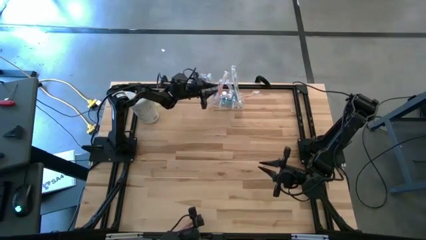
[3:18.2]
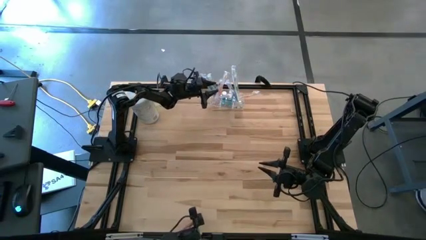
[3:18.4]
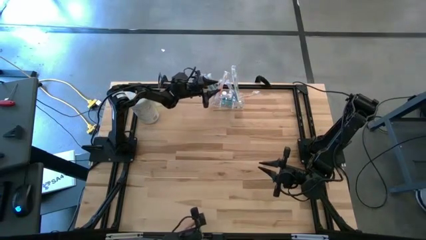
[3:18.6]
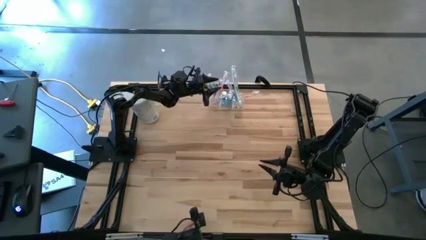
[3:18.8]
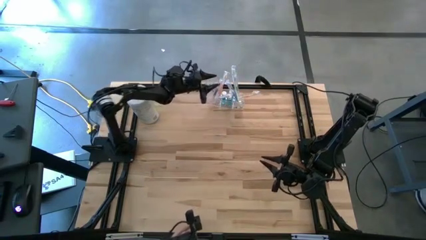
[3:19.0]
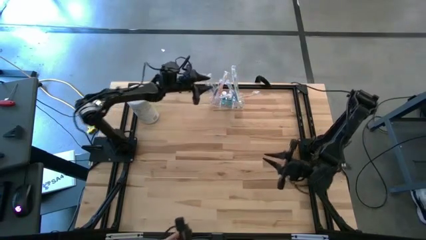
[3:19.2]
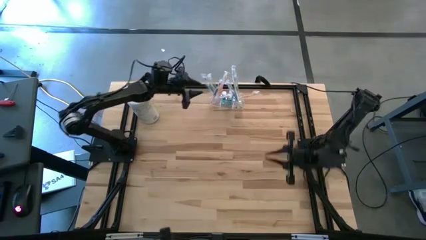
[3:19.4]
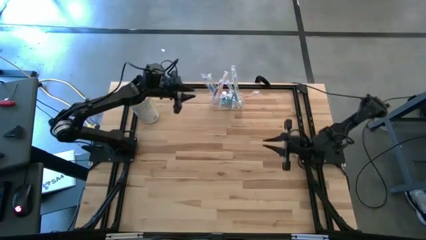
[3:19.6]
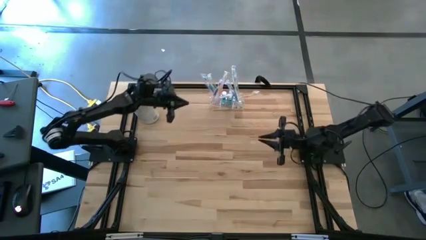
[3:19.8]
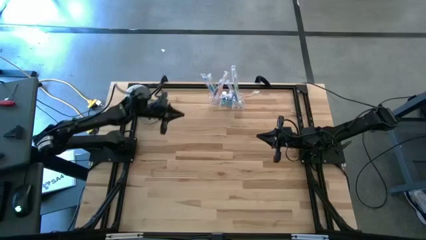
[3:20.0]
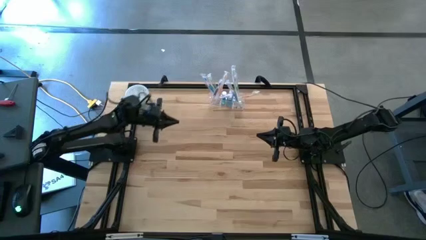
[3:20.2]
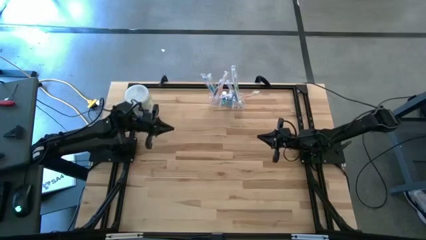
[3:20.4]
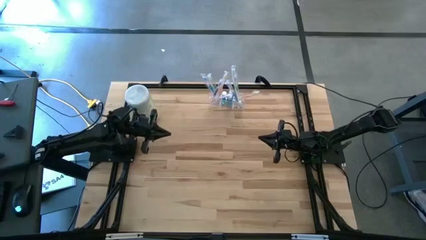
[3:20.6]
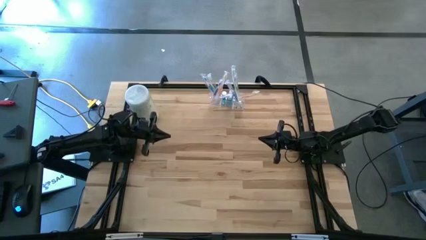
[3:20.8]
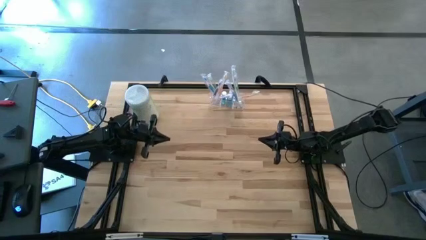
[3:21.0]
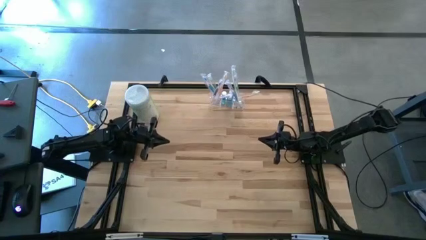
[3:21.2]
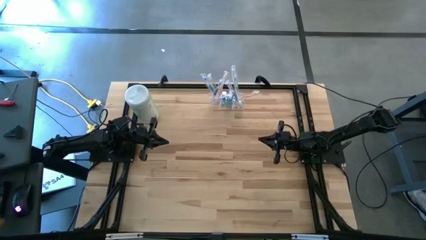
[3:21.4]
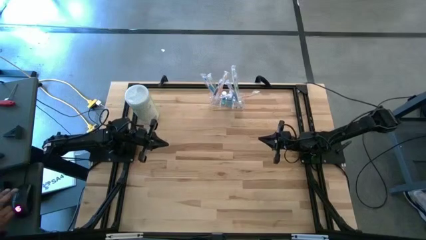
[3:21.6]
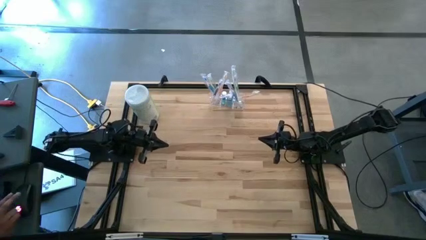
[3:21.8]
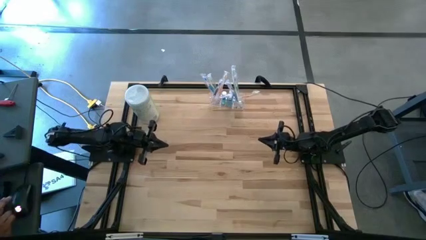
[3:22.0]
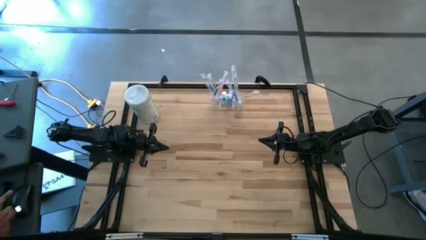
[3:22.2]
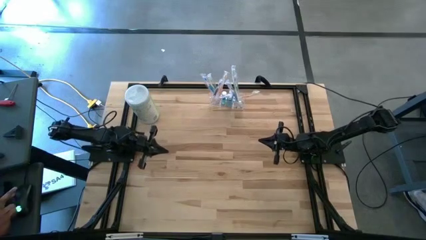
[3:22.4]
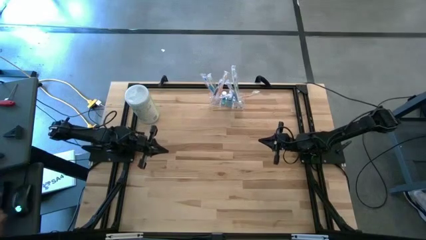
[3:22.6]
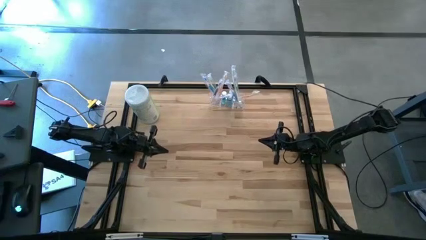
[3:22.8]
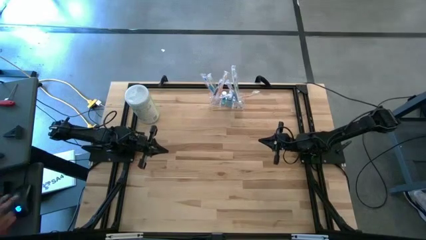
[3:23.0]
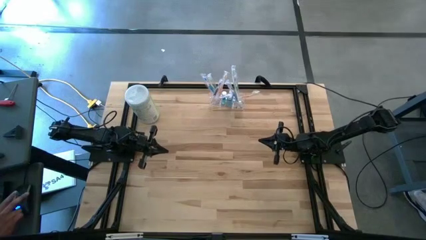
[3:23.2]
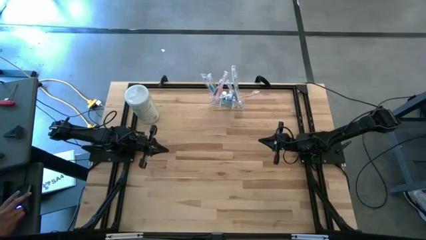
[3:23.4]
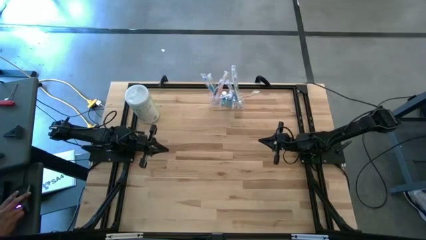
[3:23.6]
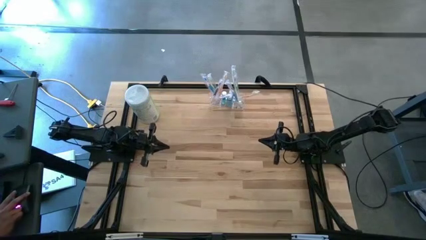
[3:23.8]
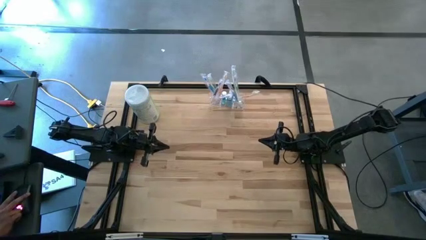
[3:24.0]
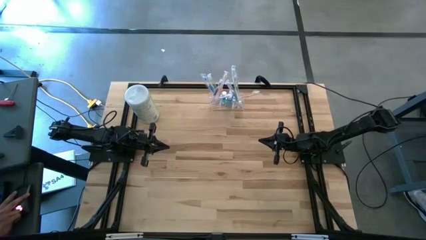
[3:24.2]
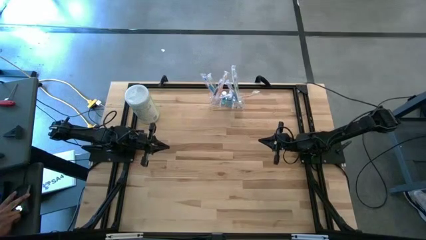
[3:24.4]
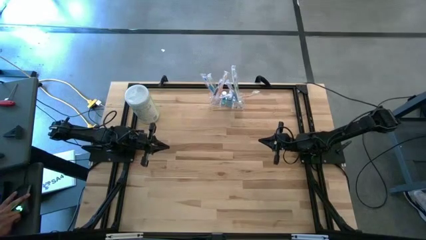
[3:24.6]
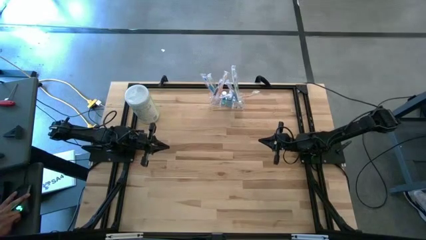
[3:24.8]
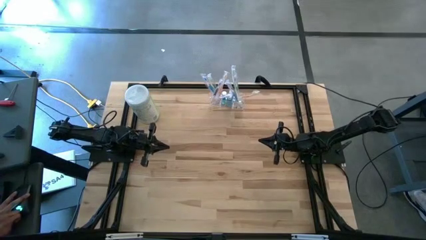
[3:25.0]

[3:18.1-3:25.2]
Task: Pick & Place toothbrushing station
Return to Home Position

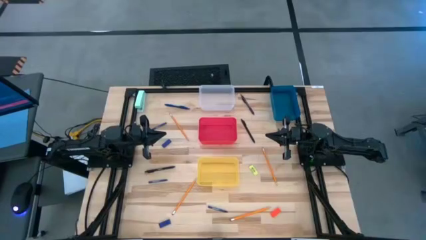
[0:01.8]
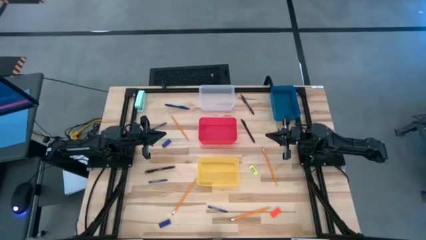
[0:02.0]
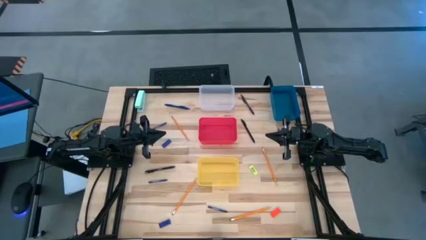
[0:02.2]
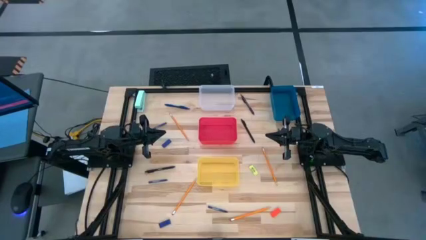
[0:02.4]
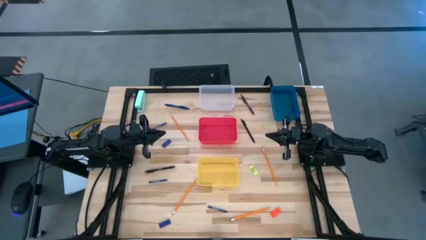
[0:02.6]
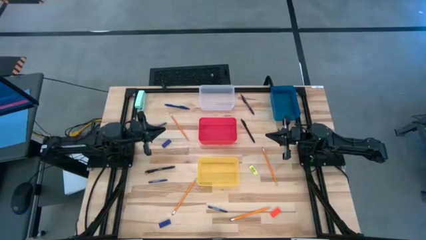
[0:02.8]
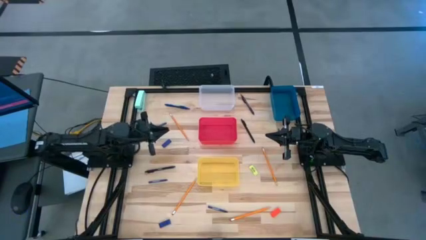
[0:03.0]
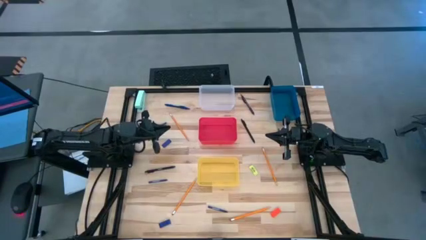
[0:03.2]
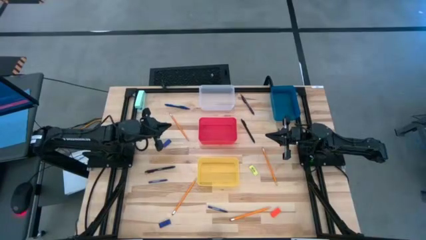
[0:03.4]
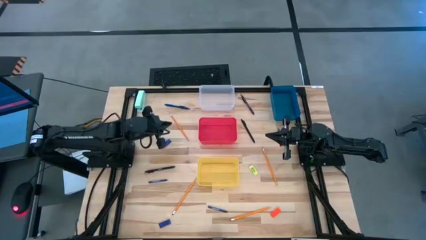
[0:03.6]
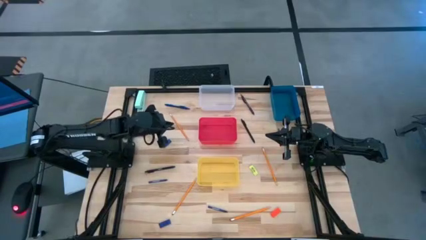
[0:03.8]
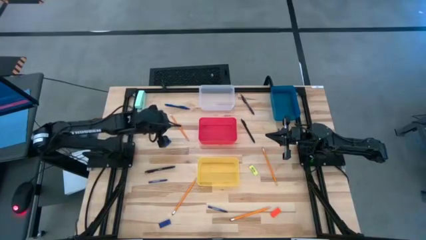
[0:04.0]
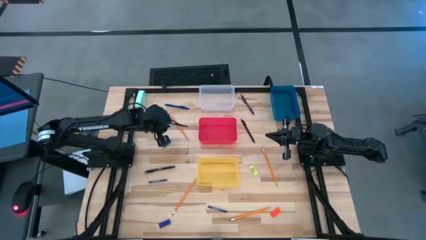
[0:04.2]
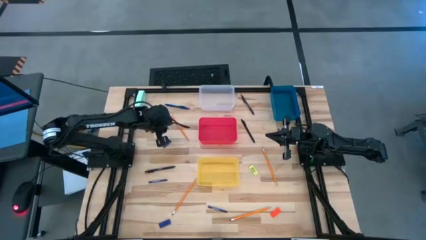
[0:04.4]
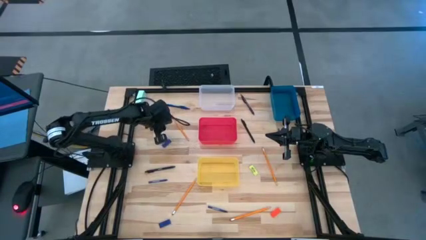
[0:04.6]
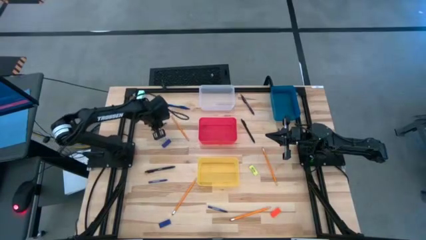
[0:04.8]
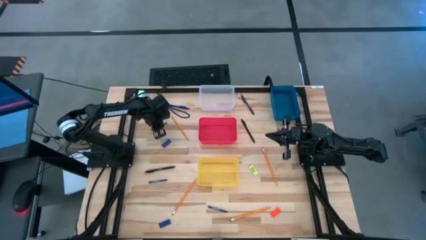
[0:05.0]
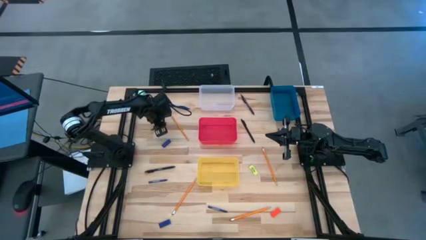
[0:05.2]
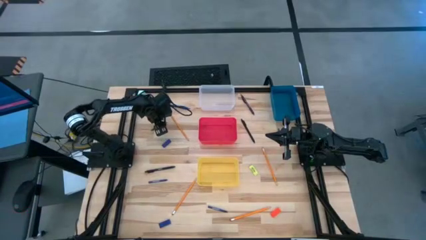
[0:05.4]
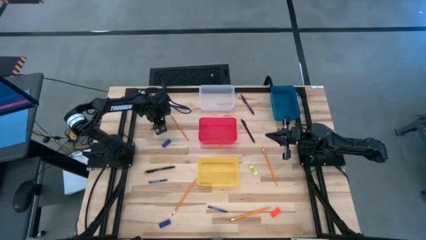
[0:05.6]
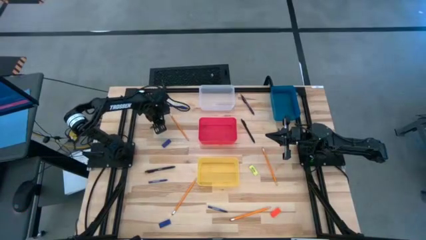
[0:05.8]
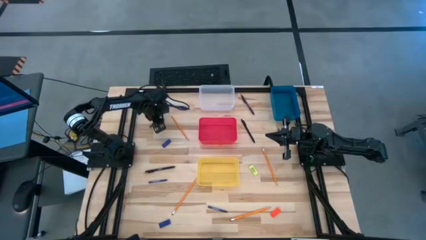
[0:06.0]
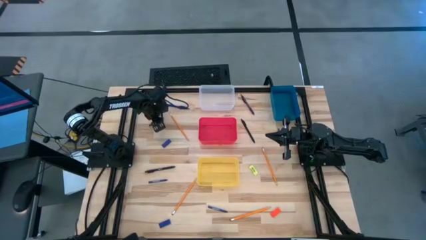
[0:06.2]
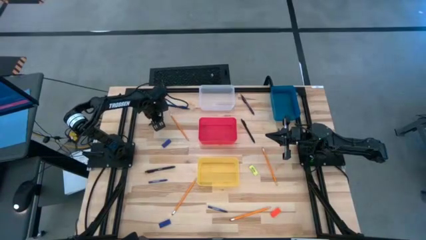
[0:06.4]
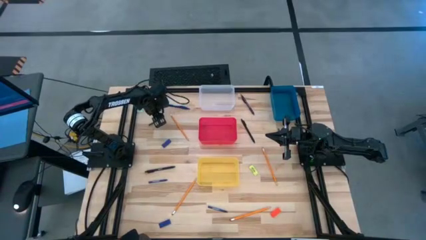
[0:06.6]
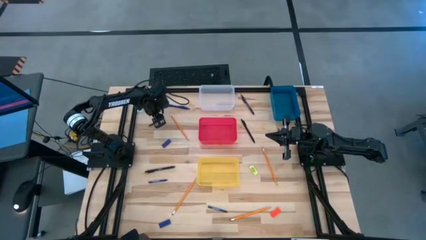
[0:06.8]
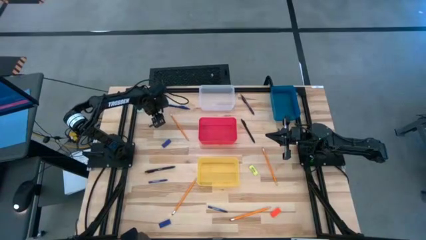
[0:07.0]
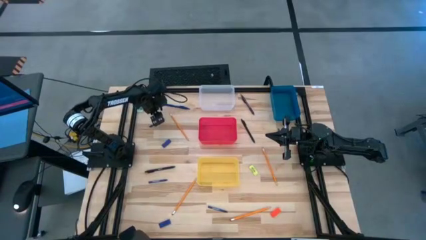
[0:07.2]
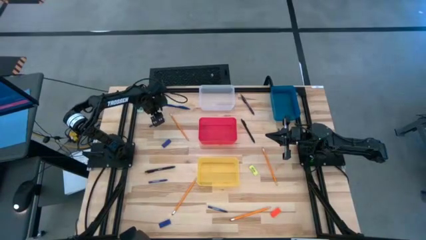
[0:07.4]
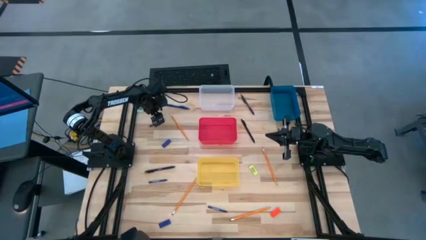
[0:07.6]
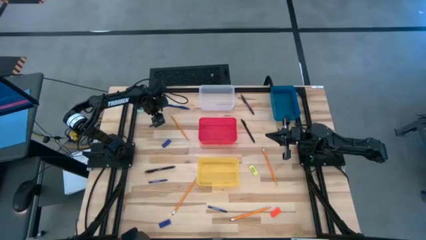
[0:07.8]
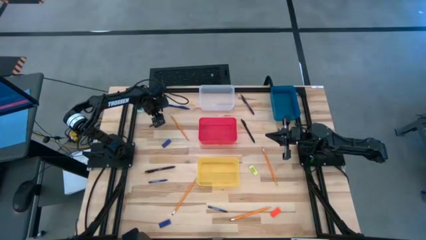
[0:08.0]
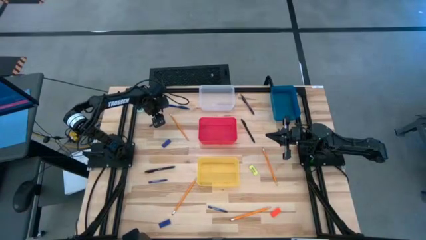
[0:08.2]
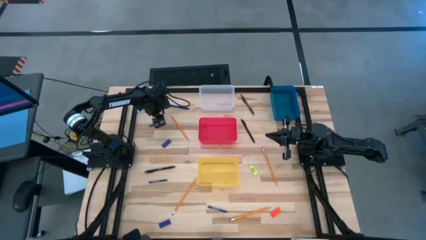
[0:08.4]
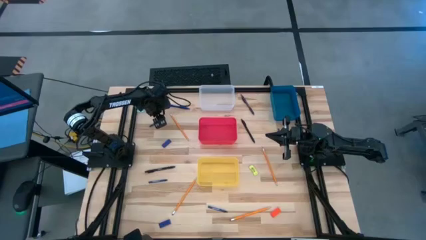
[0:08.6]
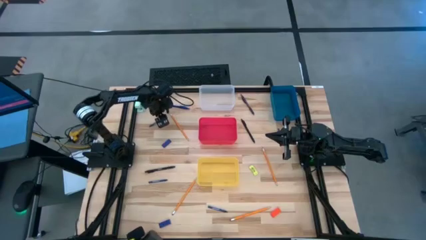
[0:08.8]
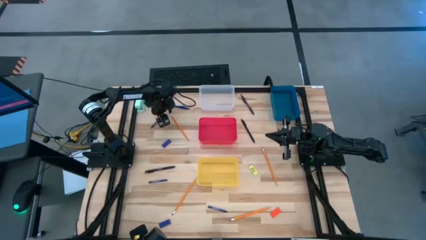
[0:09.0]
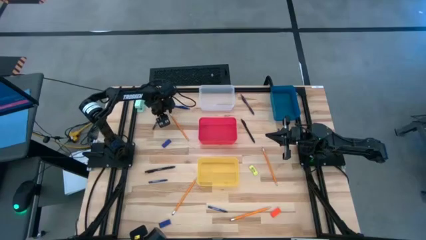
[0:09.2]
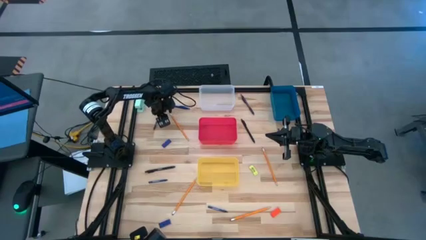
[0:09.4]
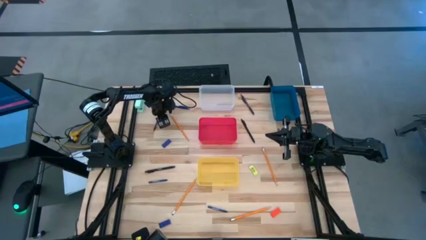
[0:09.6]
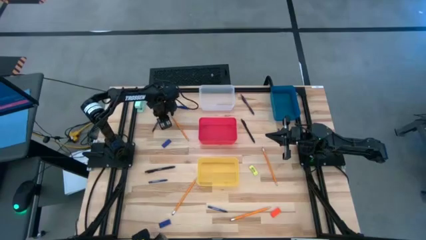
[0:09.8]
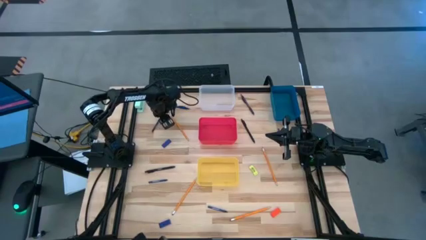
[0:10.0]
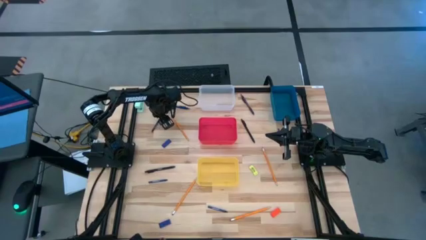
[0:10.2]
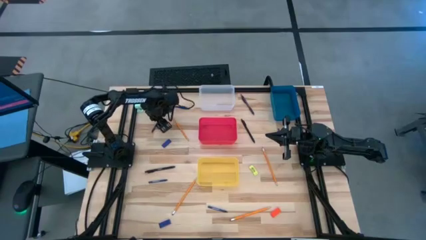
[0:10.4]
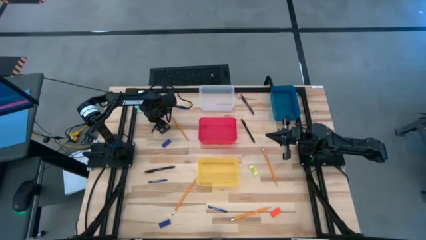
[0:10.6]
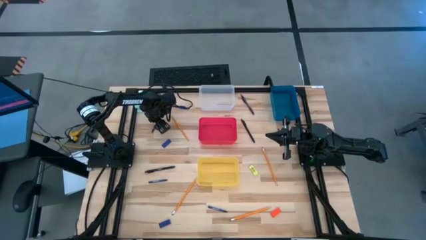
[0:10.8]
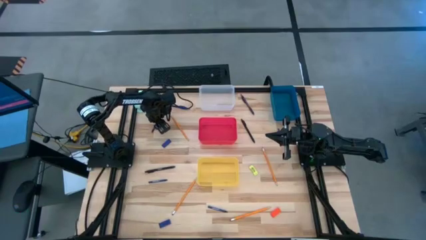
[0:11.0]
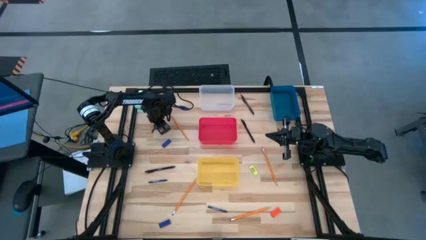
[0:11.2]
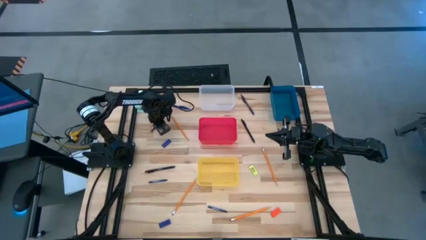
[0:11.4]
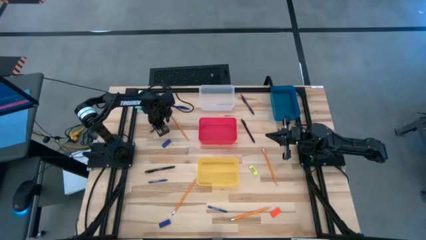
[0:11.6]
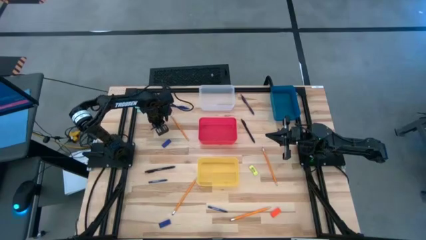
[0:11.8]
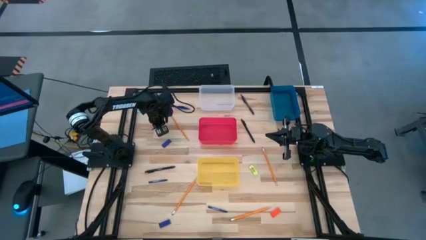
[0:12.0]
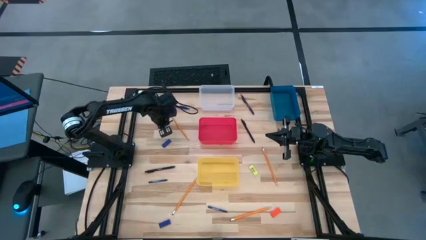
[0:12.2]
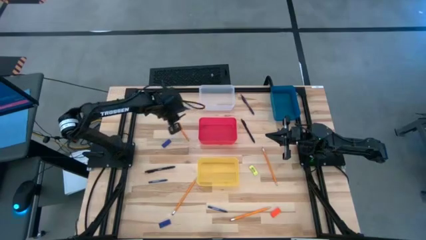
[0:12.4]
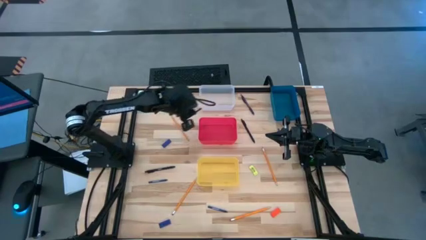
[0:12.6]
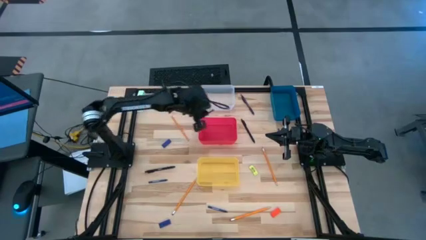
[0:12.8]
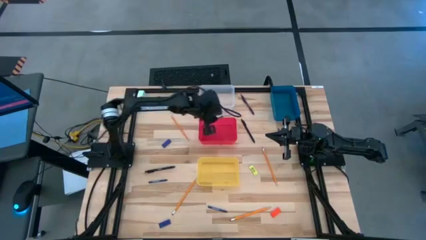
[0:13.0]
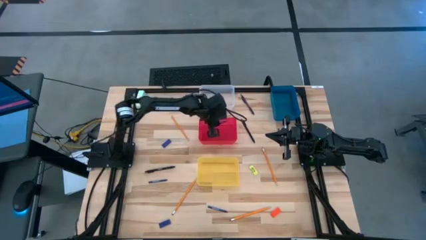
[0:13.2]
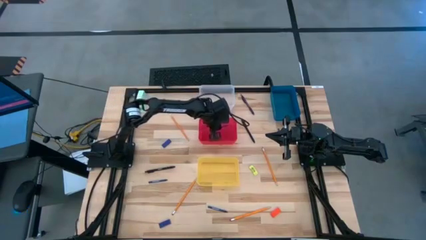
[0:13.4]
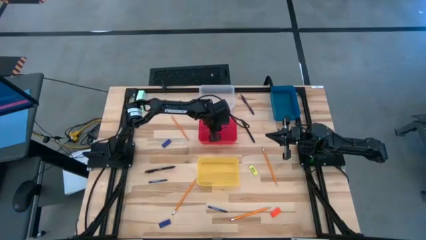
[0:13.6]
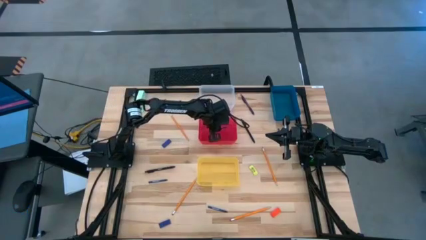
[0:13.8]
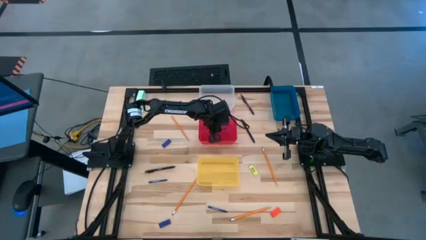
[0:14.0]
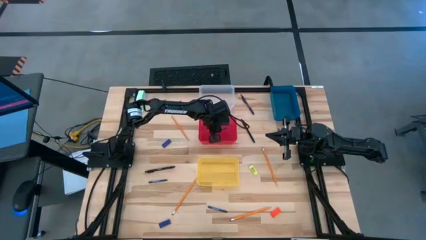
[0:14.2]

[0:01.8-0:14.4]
Task: Sort crayons/erasers/pens/pencils in bins
Put the top blue crayon into the red bin
